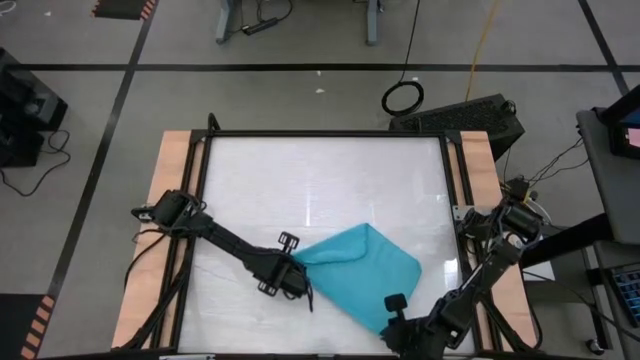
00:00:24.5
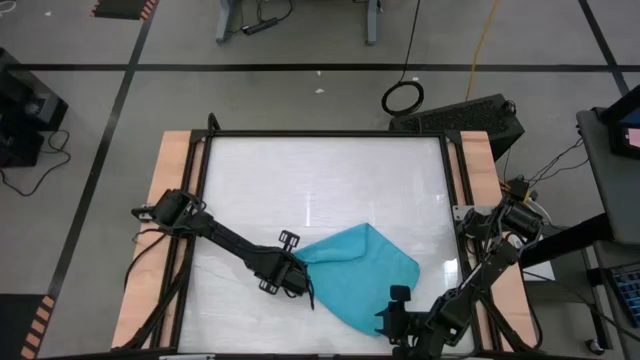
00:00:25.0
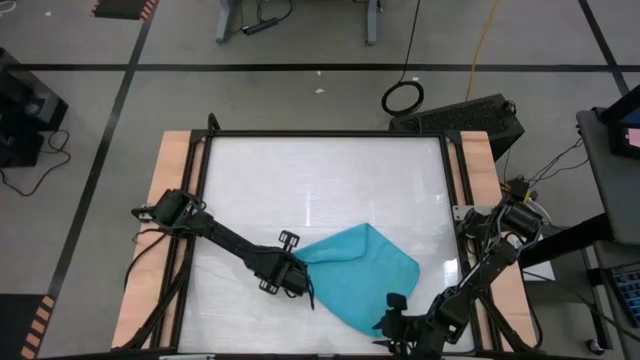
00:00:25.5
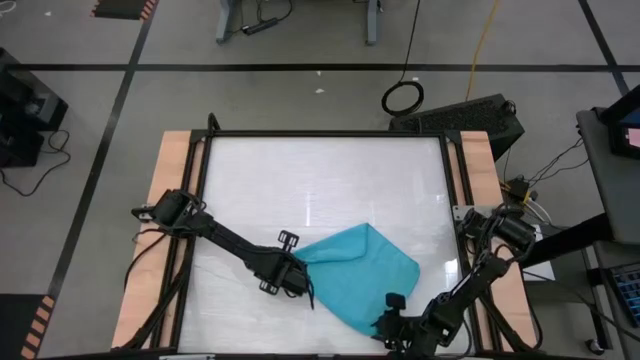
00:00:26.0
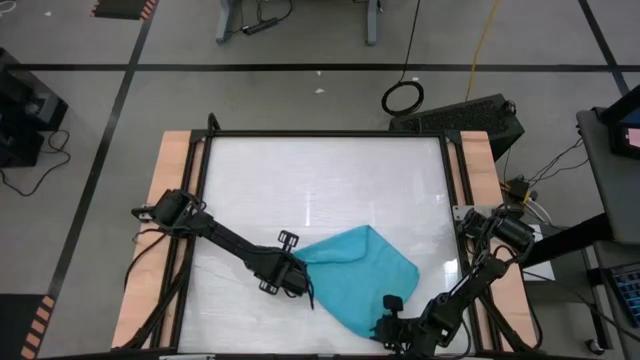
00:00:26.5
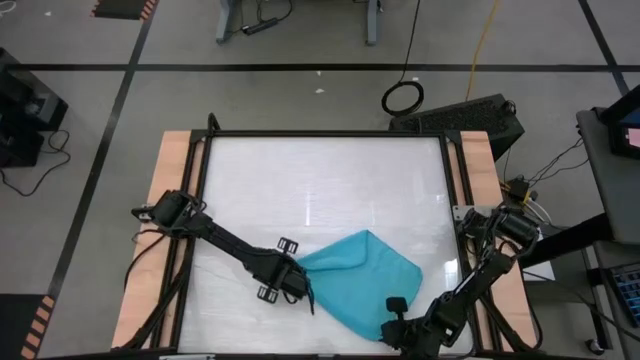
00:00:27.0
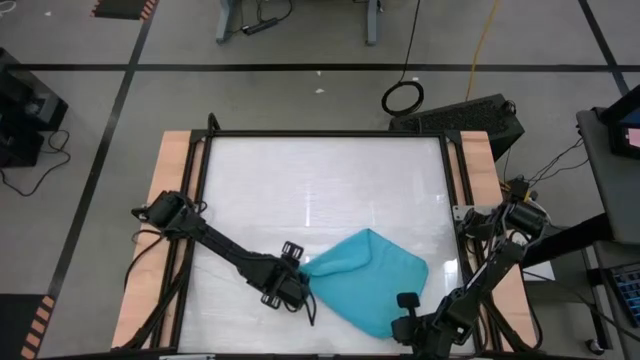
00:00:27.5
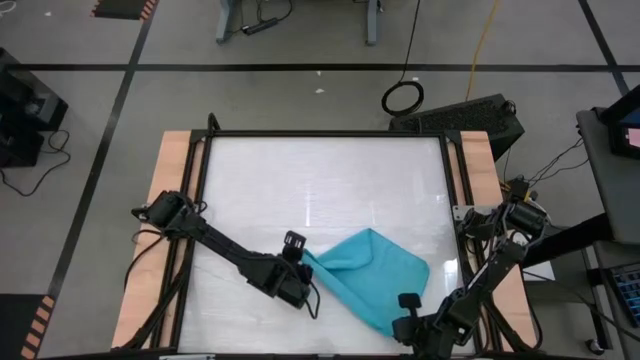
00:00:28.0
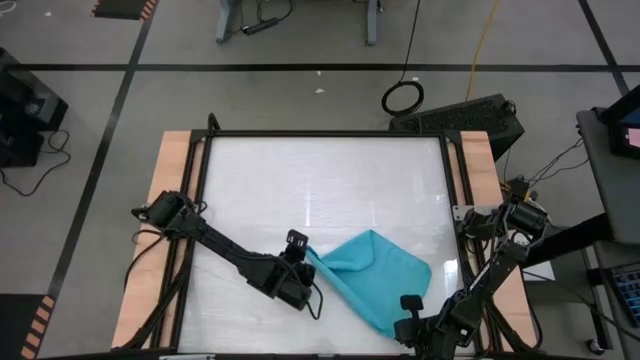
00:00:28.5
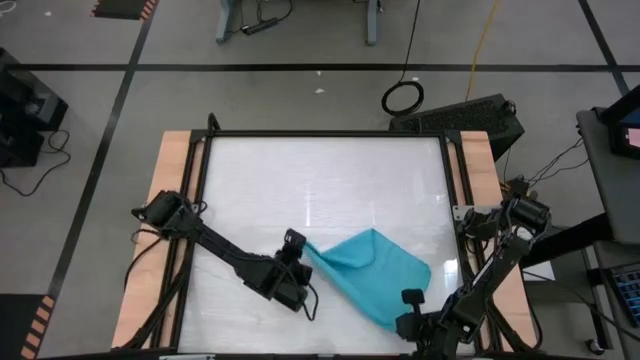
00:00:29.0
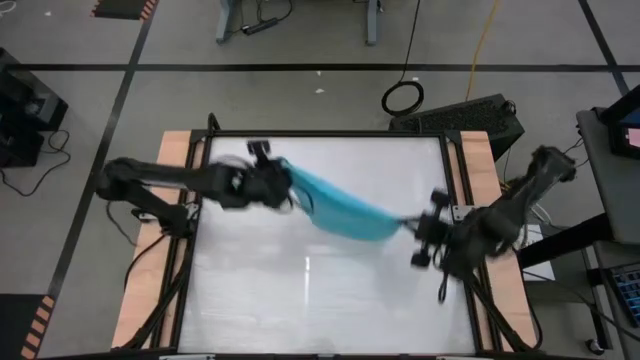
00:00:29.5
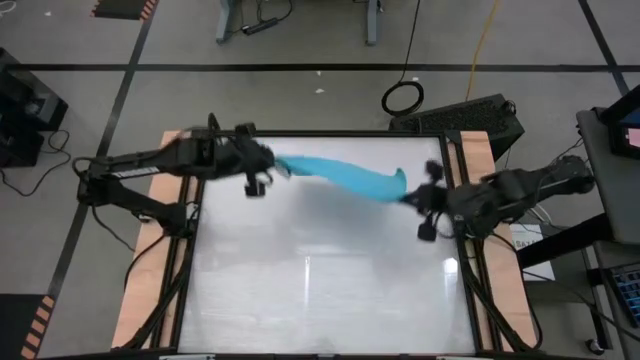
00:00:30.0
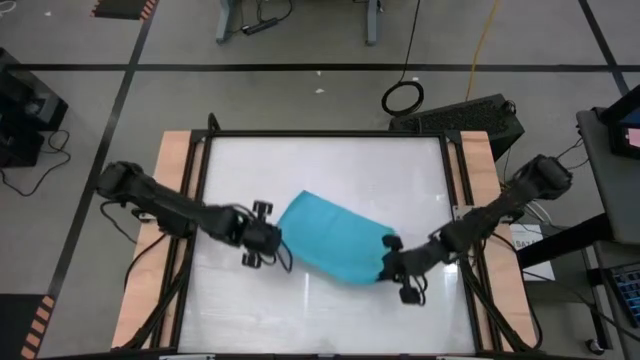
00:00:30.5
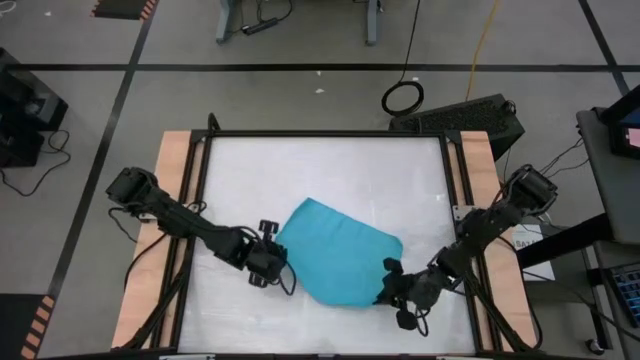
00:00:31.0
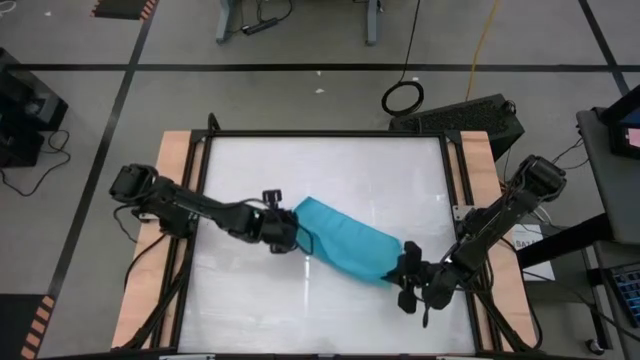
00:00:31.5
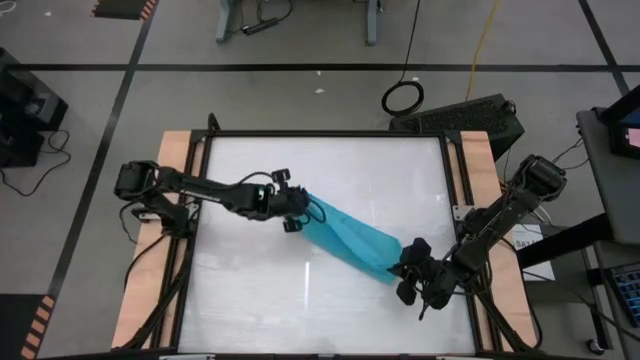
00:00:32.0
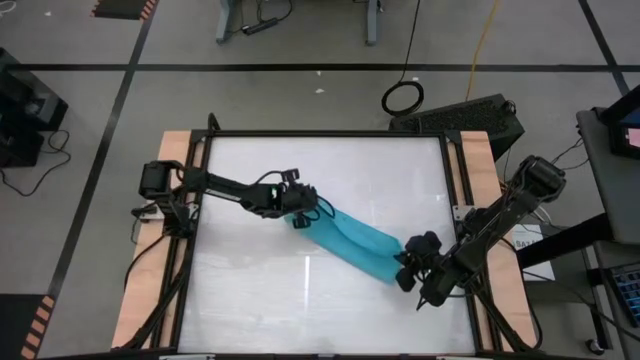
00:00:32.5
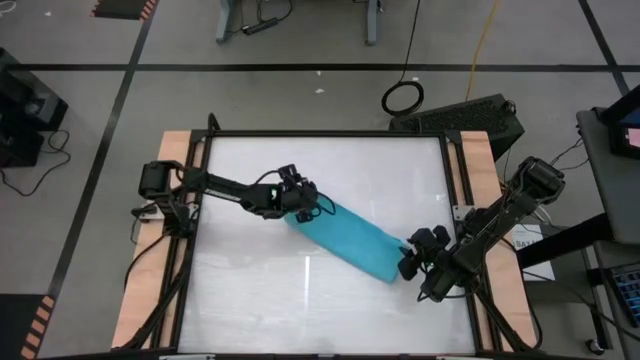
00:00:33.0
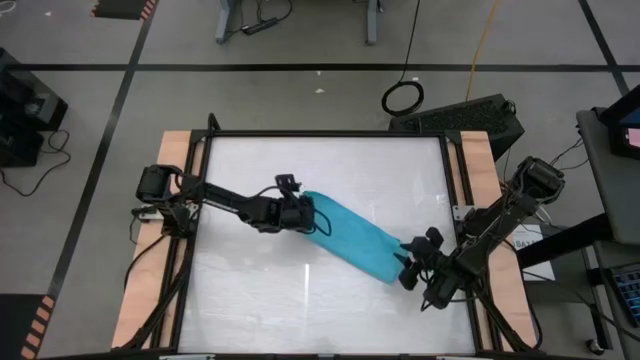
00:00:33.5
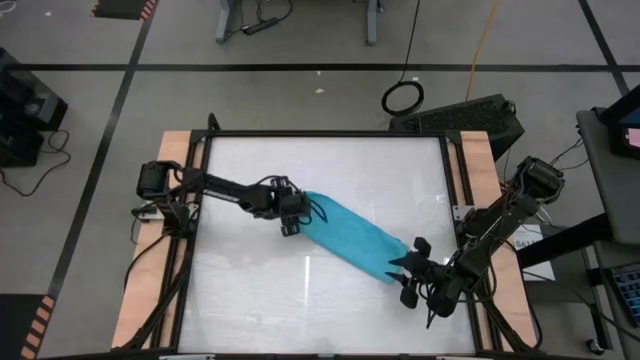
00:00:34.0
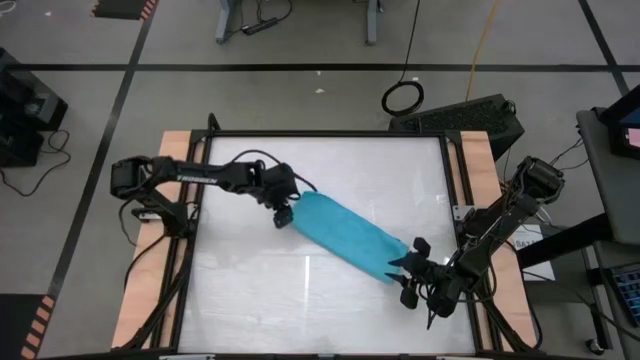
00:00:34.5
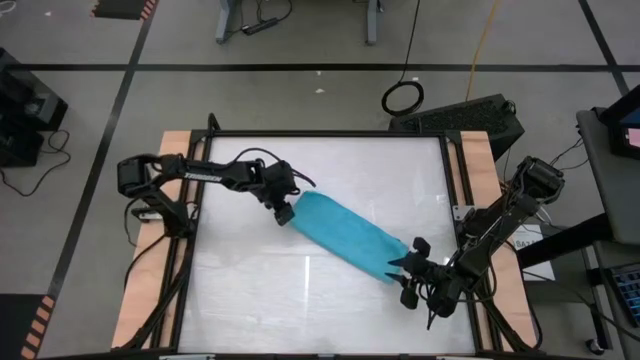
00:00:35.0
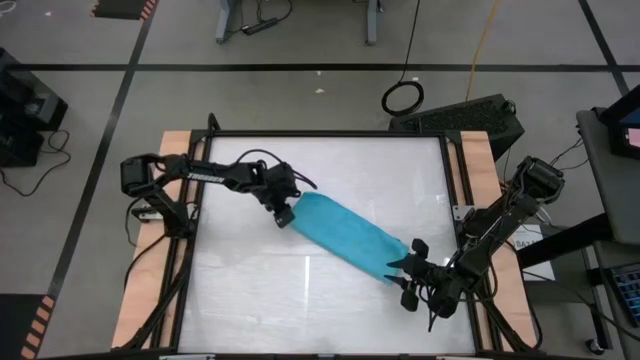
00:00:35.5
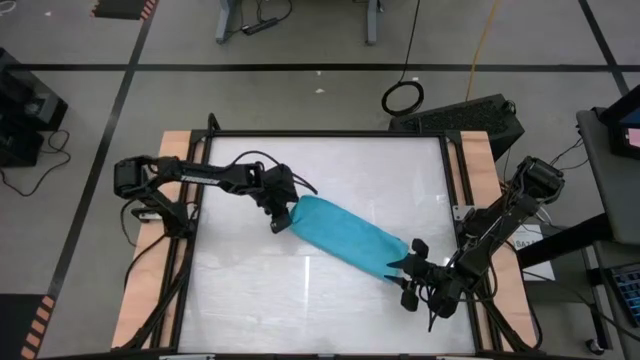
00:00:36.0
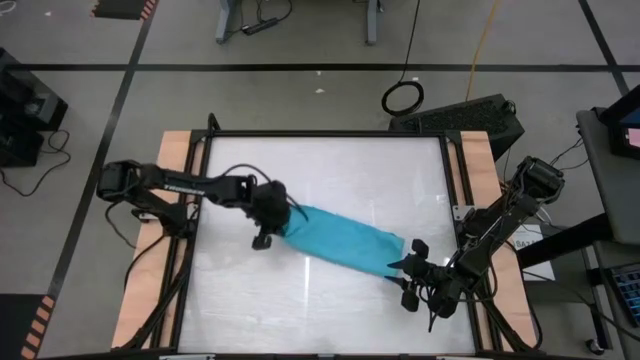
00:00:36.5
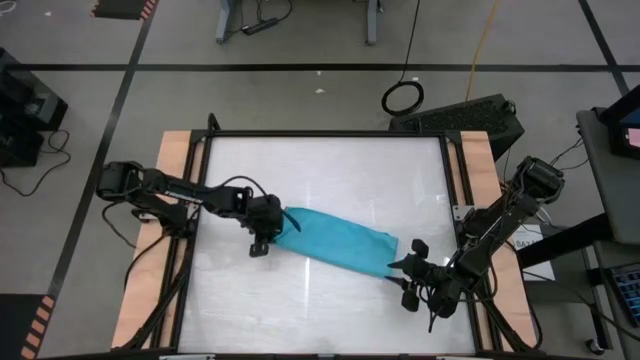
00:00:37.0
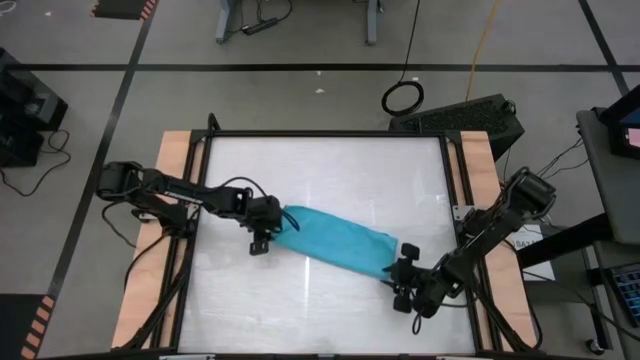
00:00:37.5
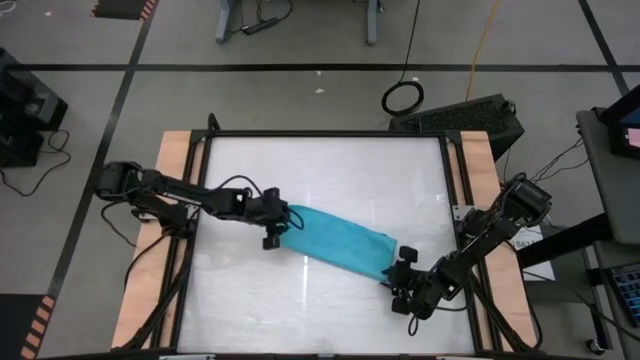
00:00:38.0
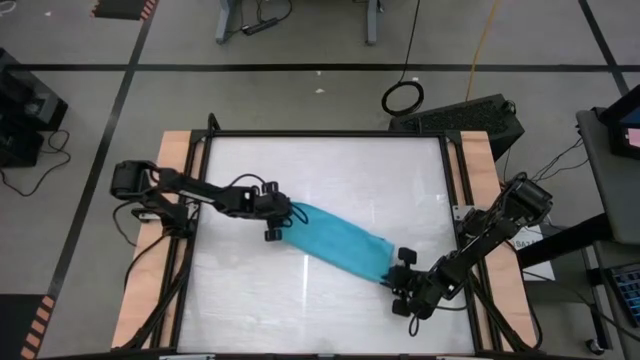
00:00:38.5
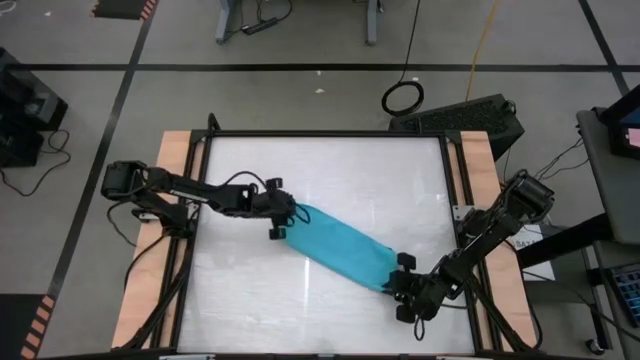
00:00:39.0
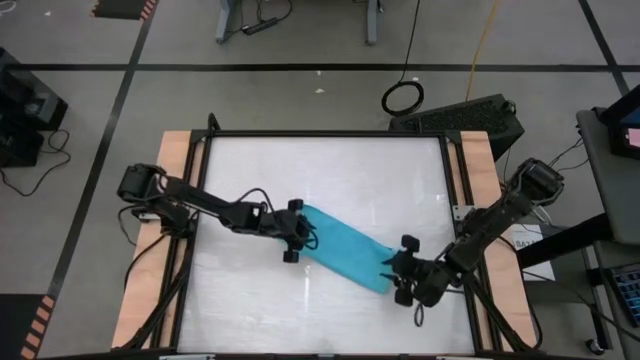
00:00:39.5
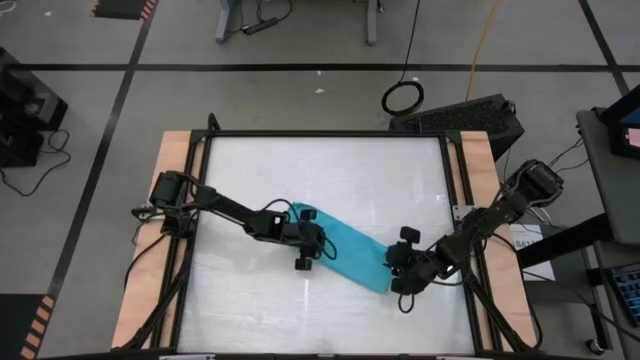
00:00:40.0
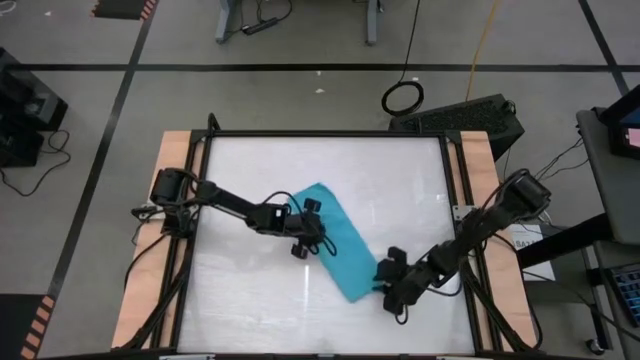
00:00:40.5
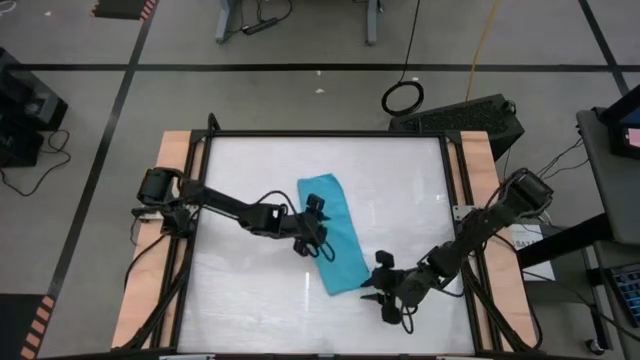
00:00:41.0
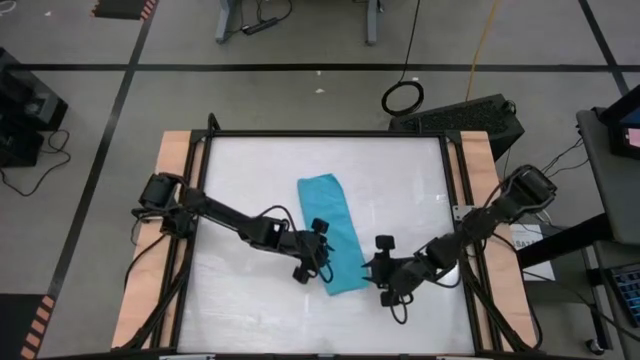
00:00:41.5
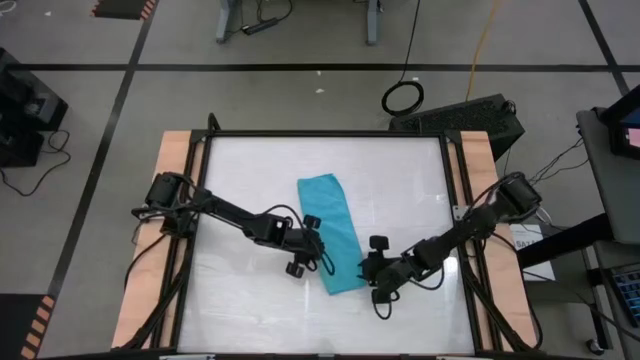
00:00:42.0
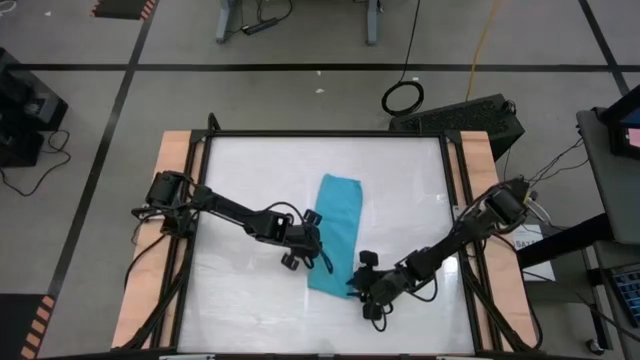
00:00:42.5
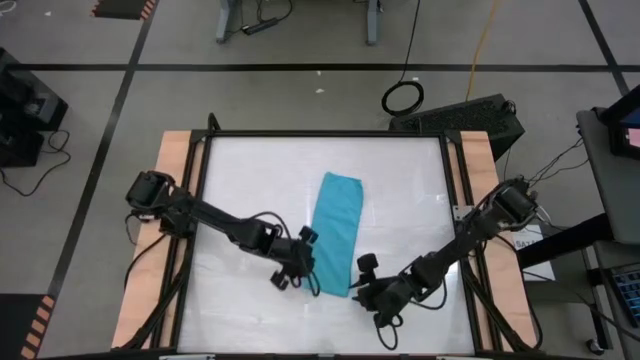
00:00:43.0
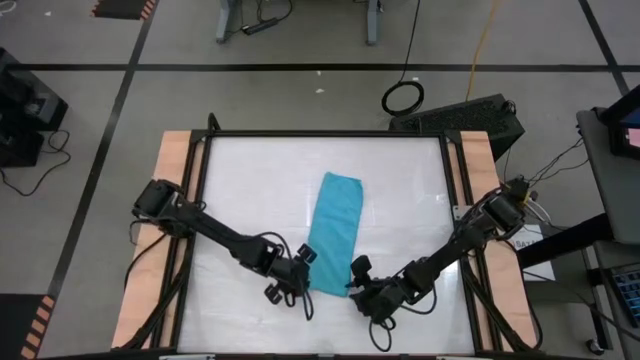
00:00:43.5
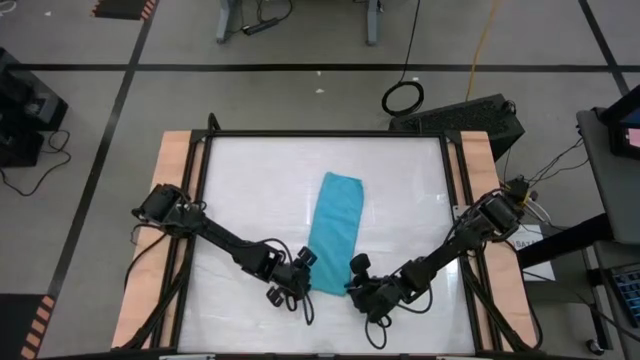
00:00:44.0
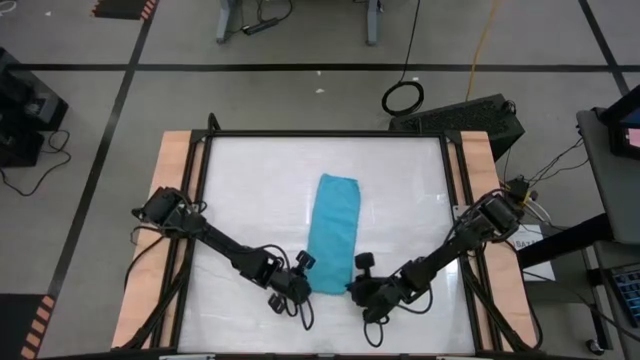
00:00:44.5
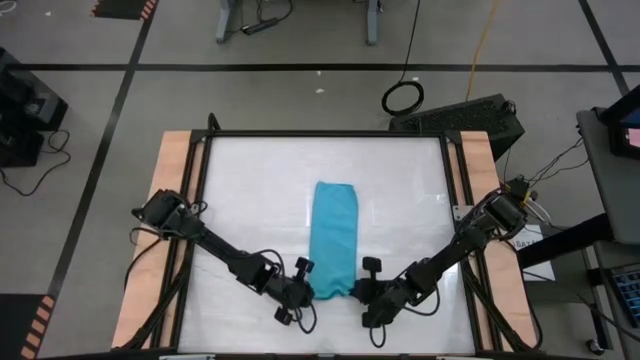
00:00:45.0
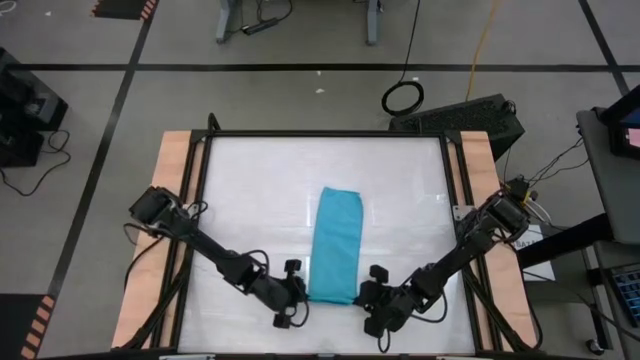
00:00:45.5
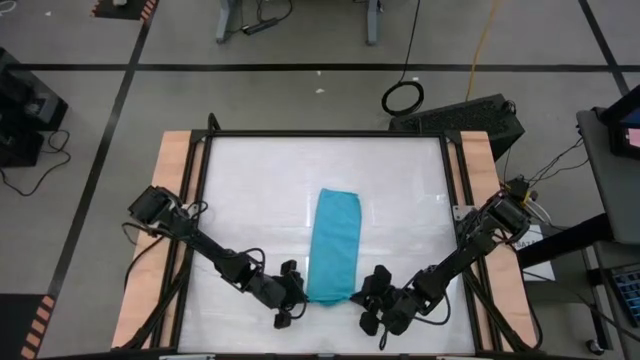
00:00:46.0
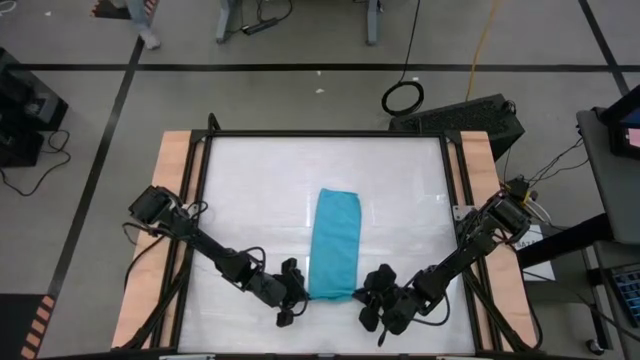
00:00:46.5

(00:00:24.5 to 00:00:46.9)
Task: Roll towel into tight, uniform cylinder
Roll the blue towel
